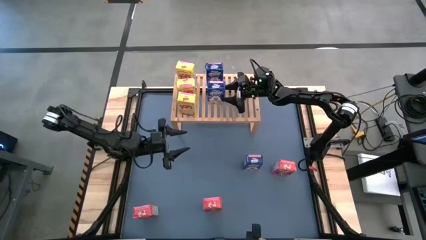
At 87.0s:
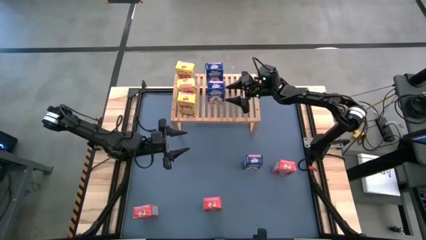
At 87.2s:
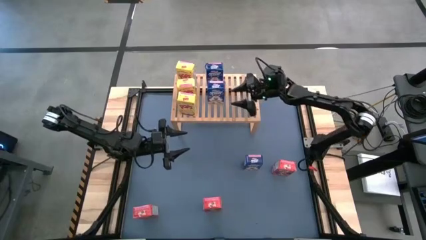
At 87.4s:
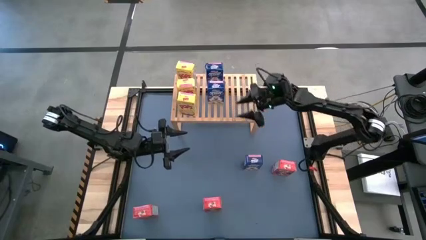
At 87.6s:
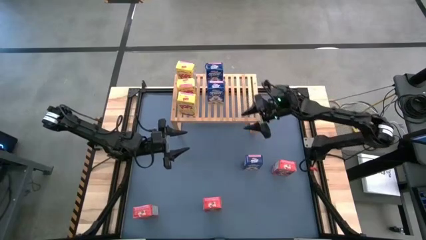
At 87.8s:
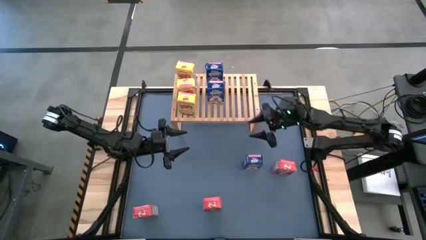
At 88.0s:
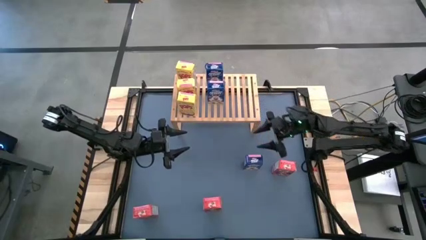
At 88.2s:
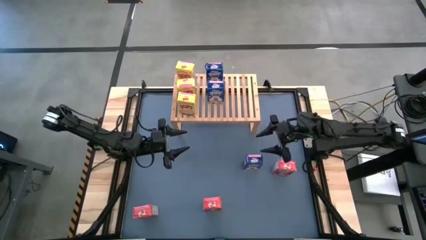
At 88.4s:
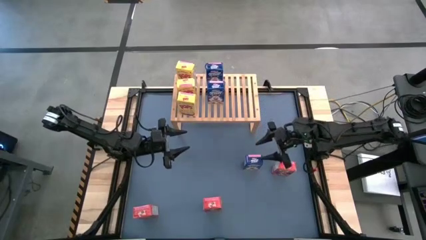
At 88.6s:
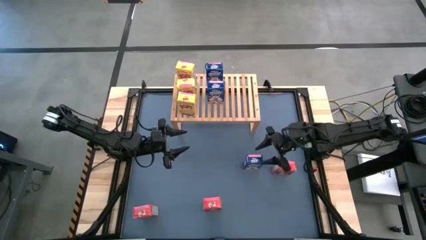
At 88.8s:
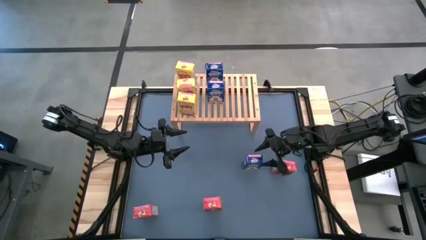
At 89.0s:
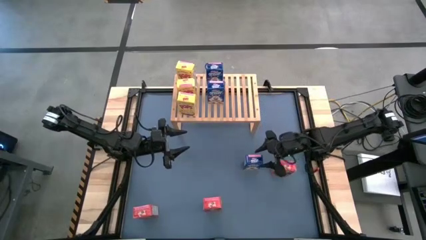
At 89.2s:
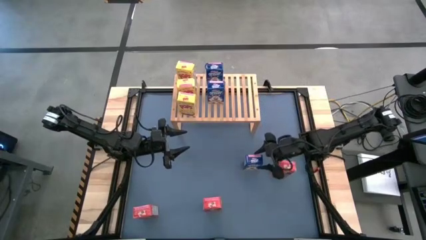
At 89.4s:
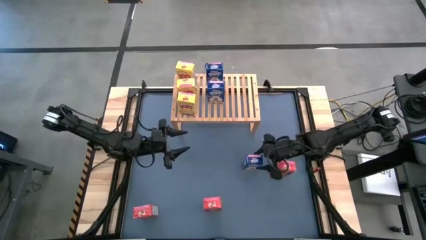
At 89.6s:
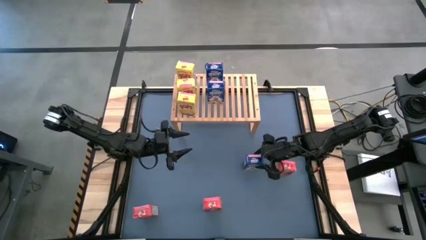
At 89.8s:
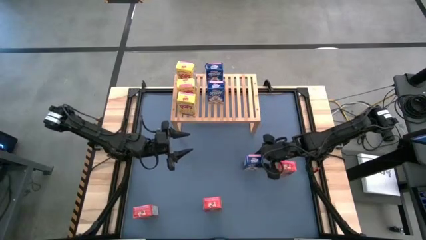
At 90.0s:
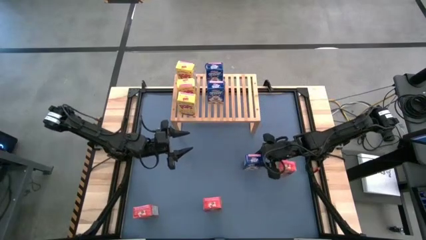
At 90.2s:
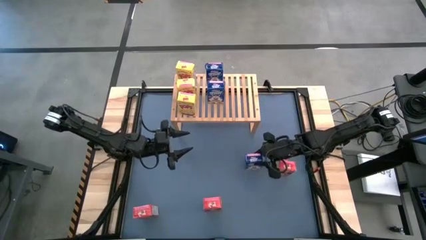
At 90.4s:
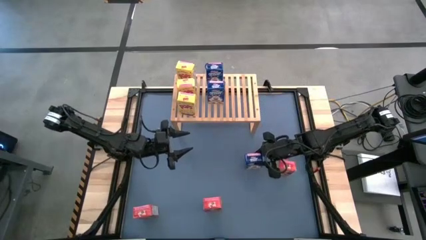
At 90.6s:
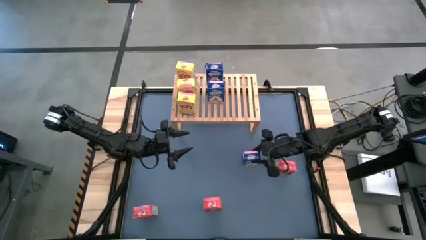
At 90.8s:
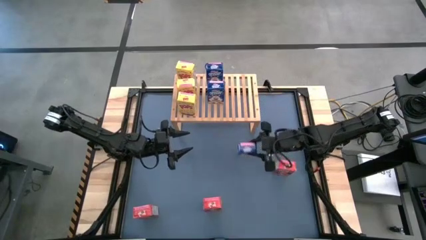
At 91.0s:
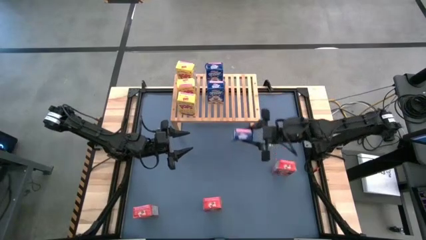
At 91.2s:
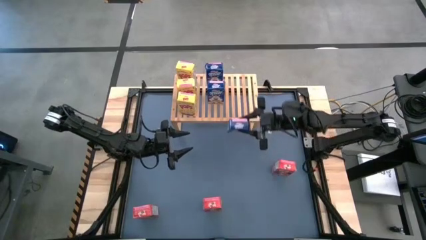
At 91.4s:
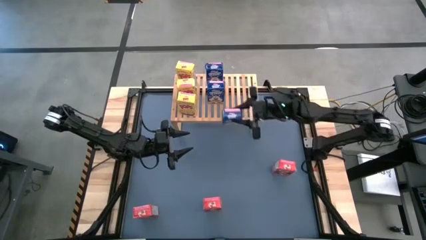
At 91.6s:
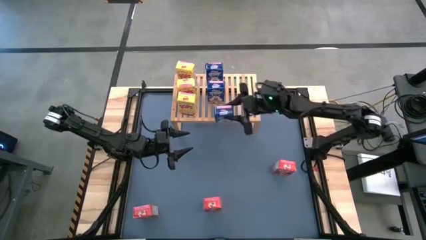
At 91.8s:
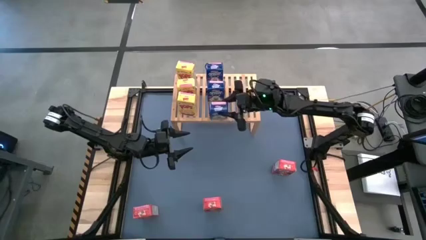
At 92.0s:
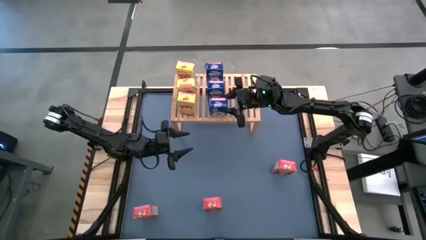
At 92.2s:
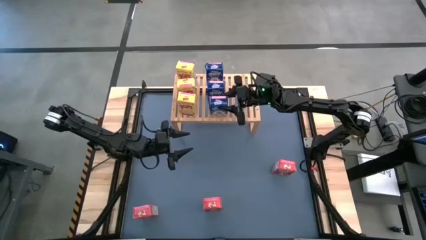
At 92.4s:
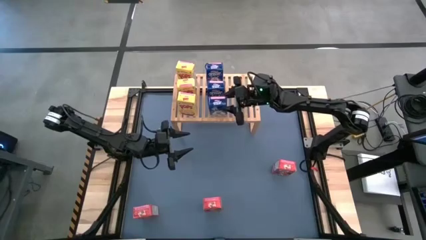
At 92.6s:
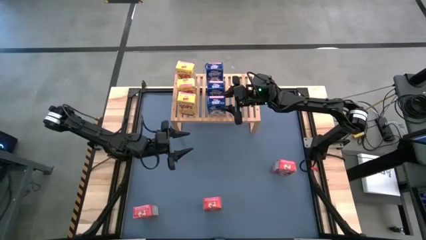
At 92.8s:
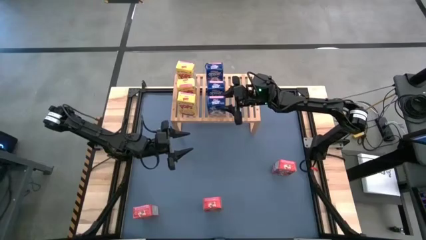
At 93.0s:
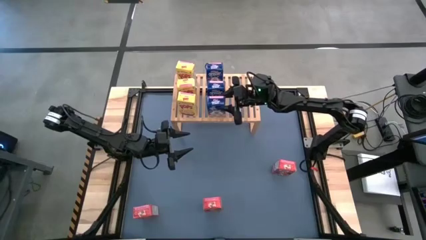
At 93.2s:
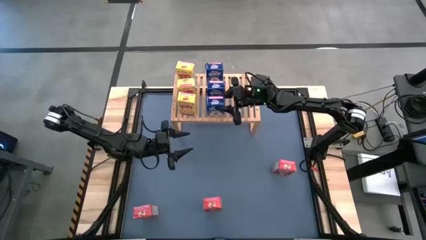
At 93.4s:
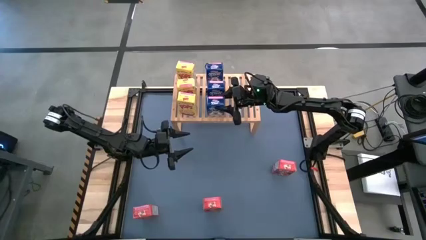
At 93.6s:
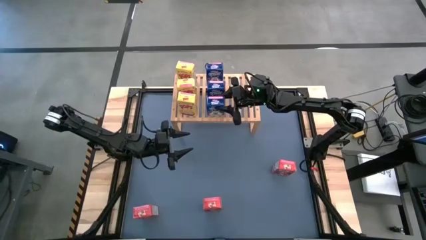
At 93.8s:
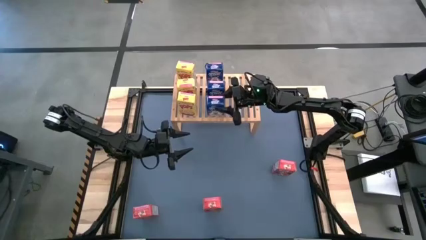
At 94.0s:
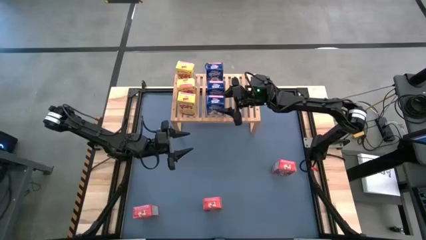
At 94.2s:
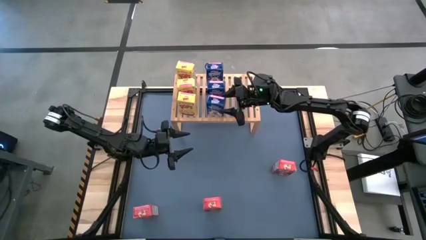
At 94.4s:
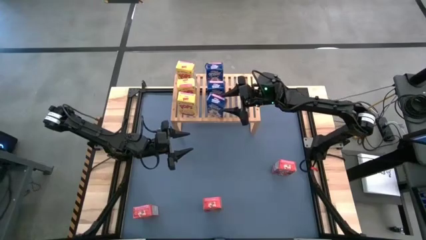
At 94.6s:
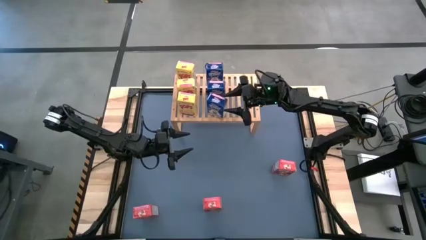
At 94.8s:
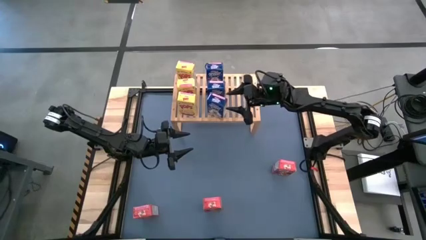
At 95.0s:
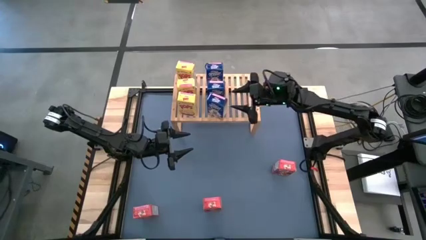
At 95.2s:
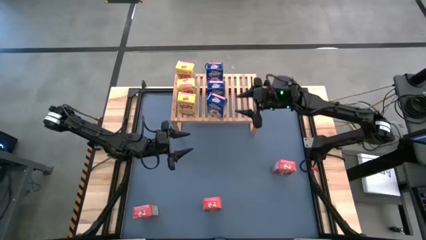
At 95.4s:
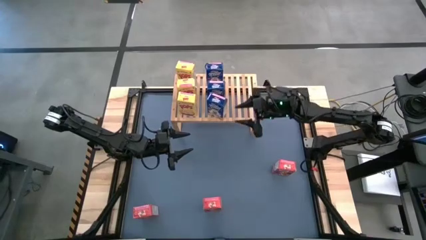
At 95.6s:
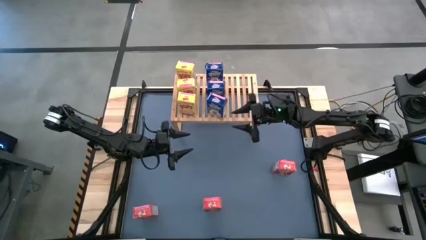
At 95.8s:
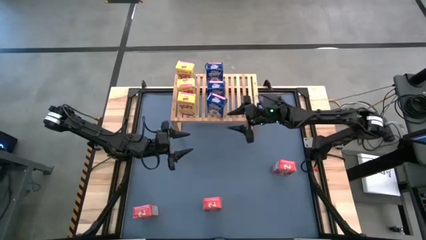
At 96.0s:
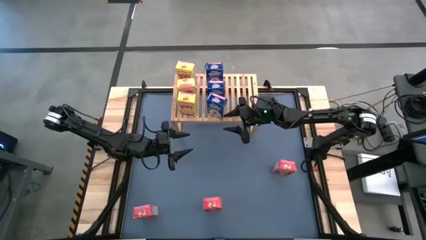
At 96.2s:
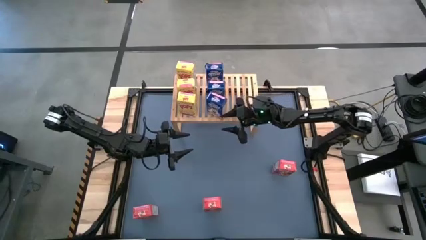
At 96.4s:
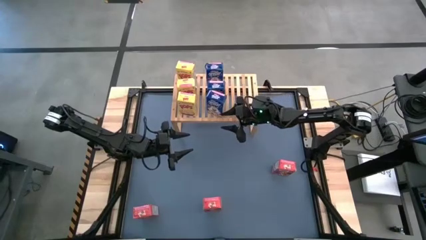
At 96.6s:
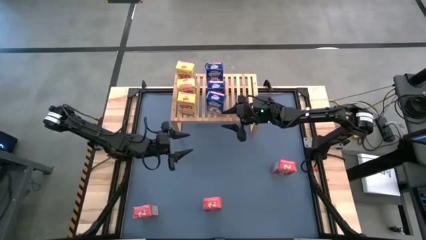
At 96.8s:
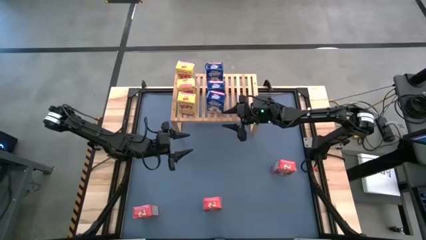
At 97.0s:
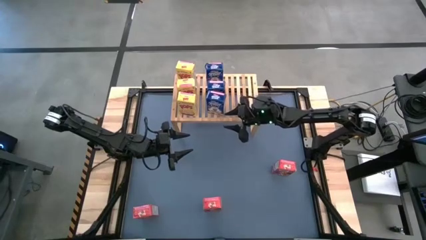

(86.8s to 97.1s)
Task: Stack cereal on shelf
Put the blue cereal box on the shelf aligned with the other blue cereal boxes

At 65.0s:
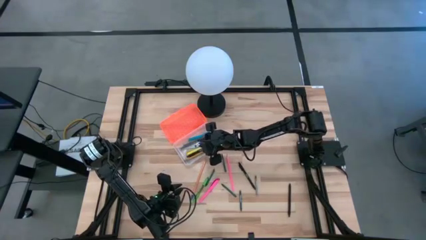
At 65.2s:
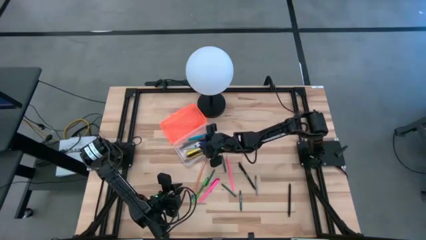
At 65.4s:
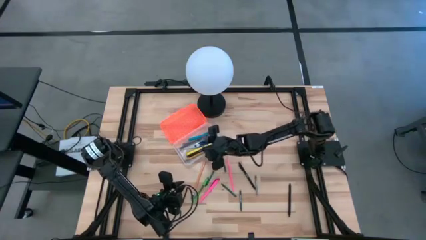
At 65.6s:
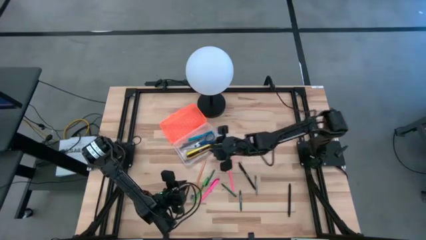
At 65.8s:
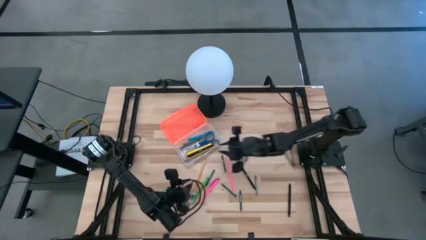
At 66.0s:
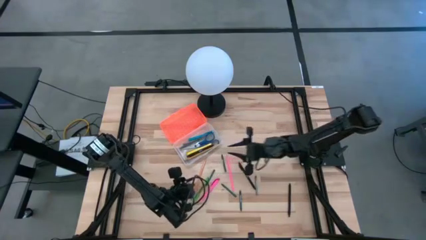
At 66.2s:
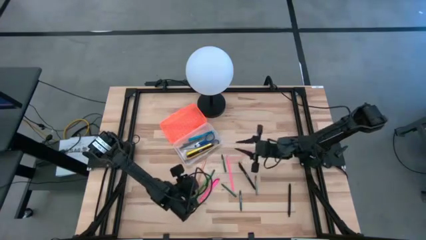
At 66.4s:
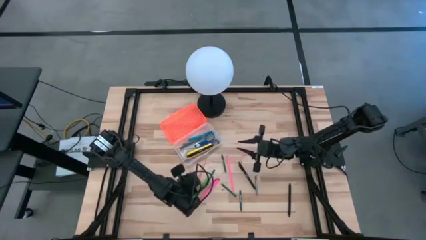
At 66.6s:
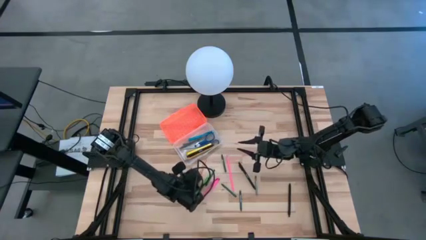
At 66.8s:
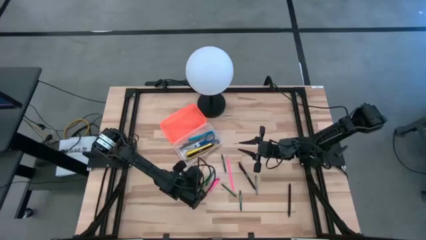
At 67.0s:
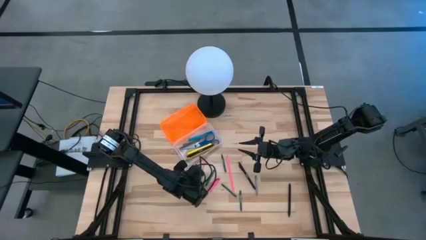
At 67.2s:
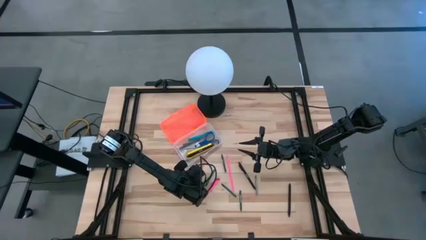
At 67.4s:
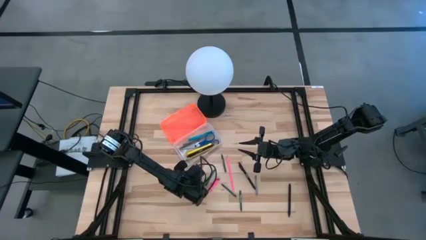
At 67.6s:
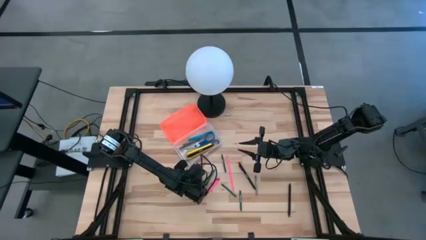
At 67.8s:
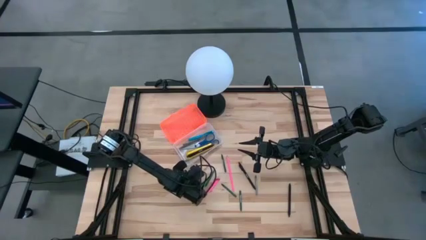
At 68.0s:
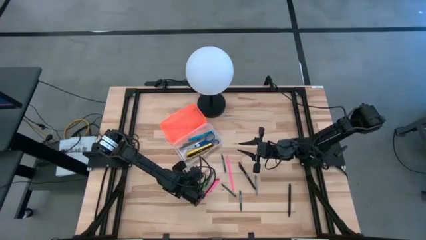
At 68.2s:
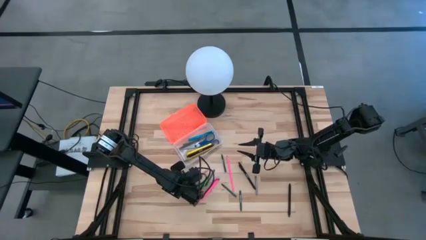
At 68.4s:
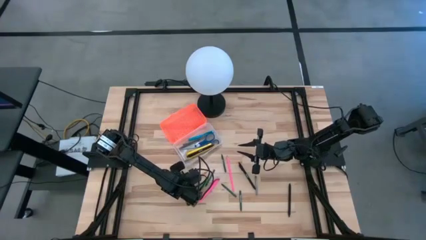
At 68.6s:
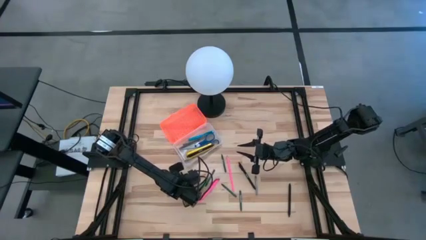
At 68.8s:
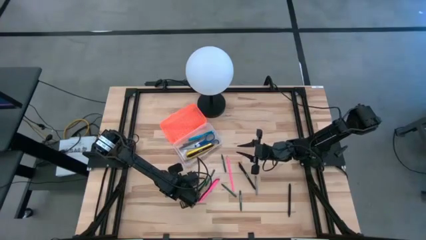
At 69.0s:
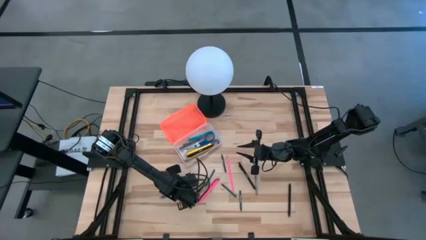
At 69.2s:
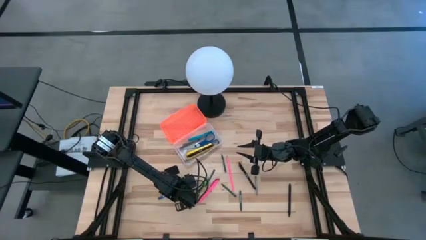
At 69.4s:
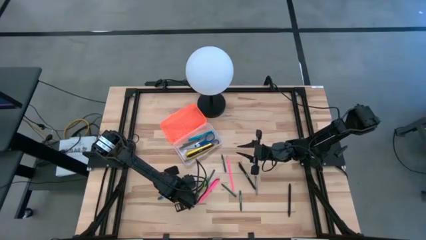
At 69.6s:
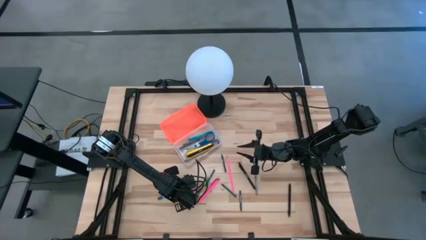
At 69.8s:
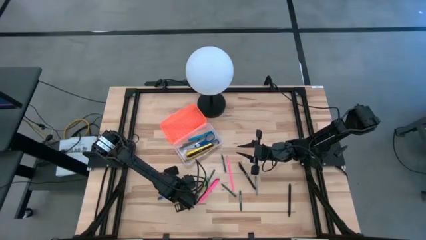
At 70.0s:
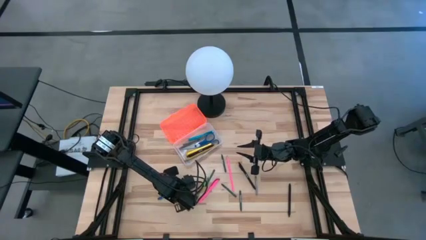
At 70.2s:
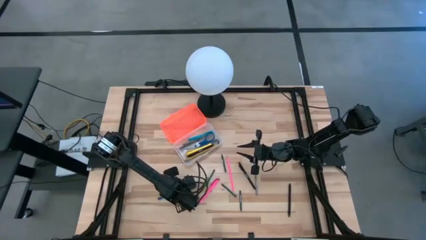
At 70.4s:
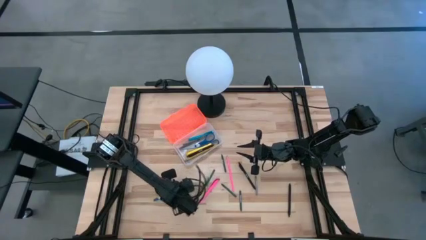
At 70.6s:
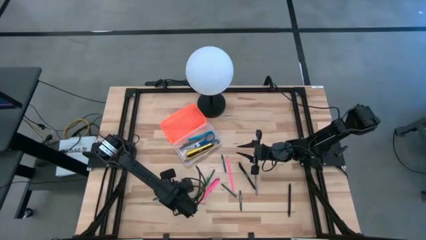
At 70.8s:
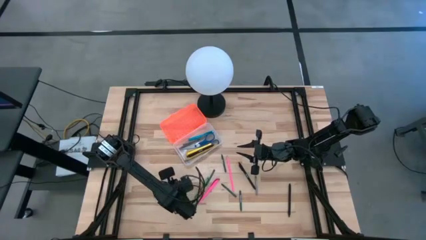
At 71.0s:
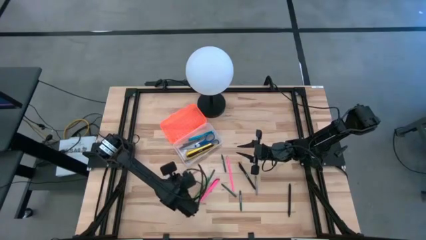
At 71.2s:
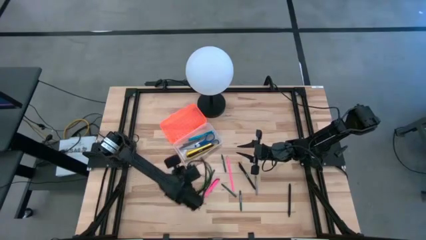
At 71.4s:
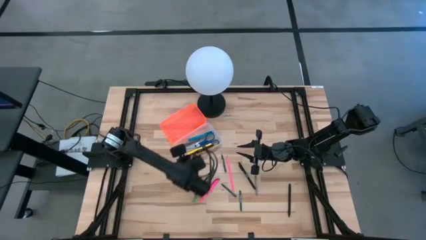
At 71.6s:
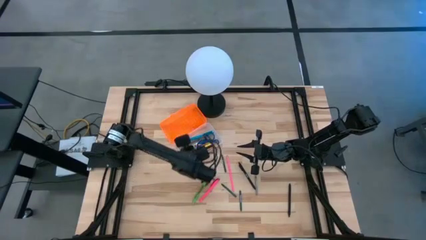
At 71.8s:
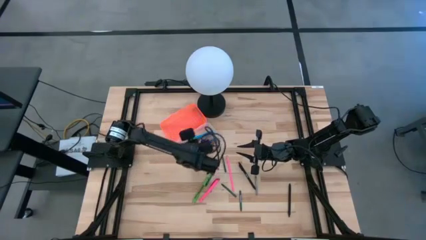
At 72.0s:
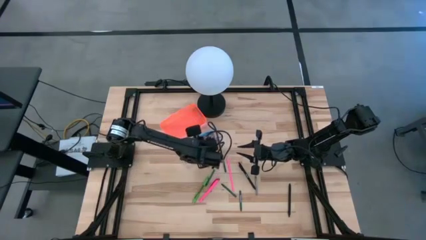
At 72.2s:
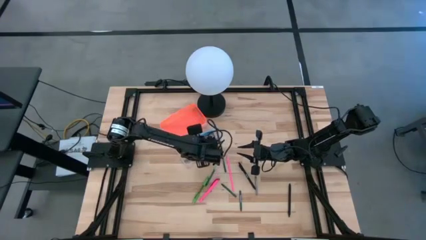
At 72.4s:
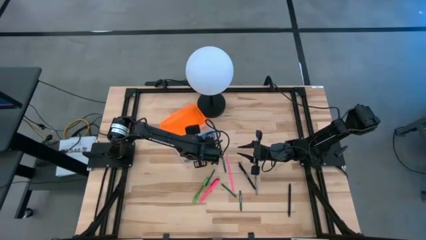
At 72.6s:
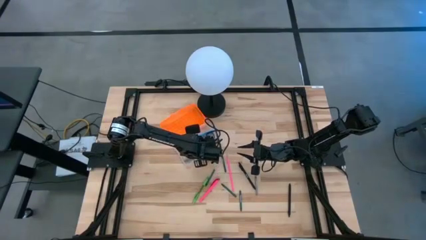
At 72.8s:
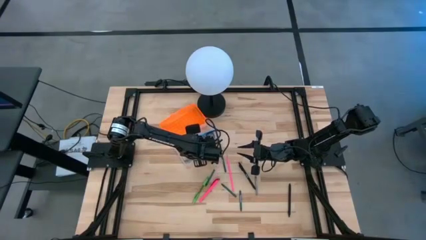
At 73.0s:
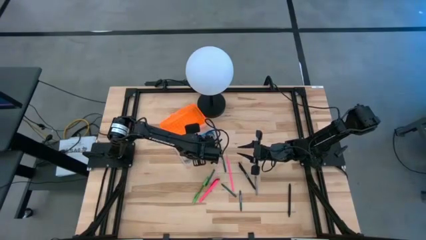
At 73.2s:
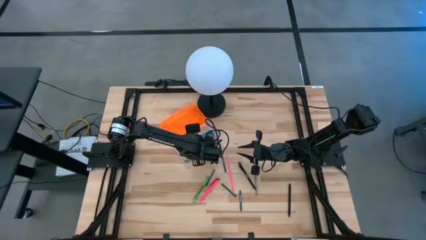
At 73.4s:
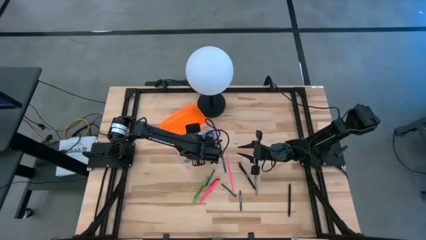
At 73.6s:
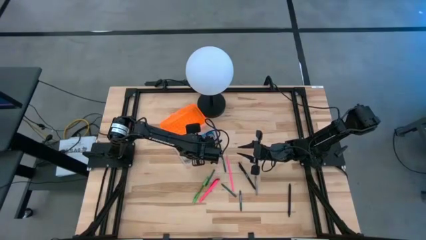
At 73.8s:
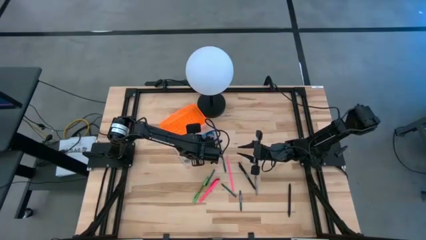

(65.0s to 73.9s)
Task: Pick & place school supplies into a supply box
Put the orange pencil into the orange supply box
